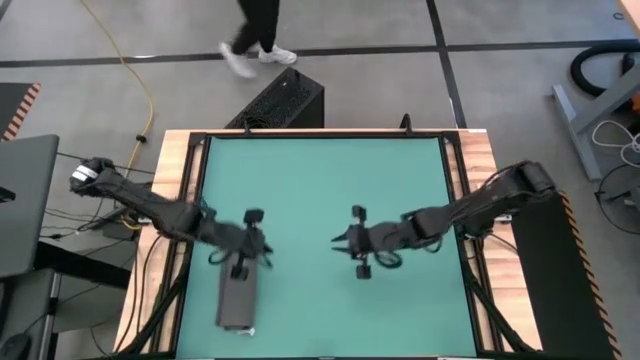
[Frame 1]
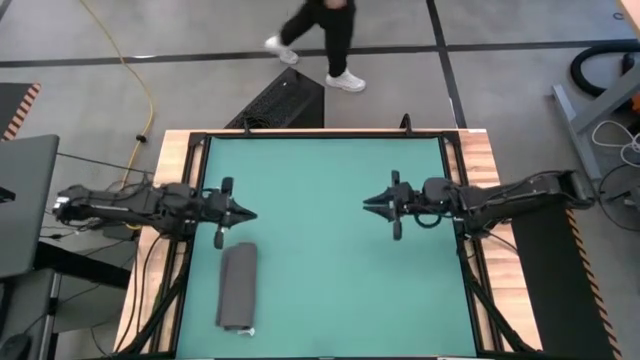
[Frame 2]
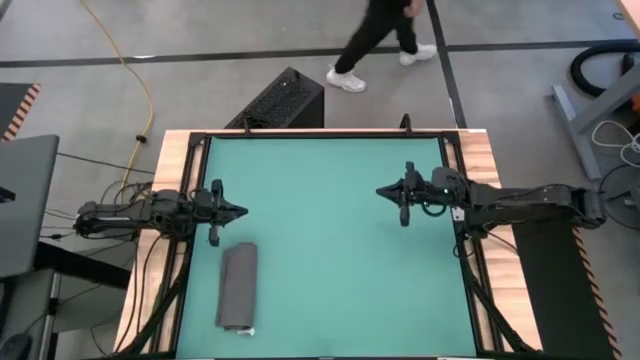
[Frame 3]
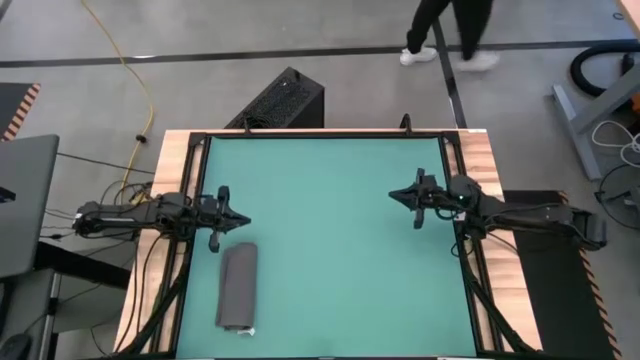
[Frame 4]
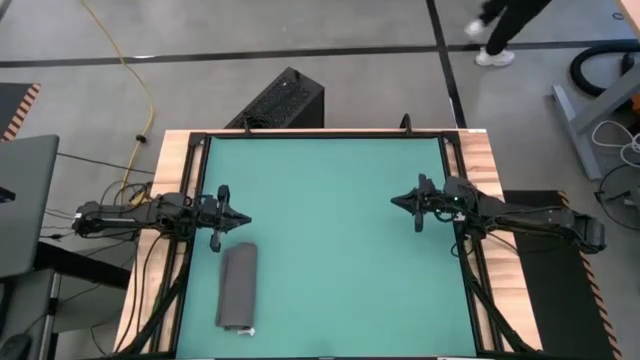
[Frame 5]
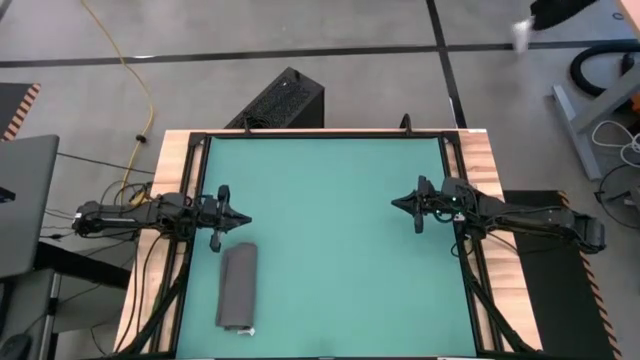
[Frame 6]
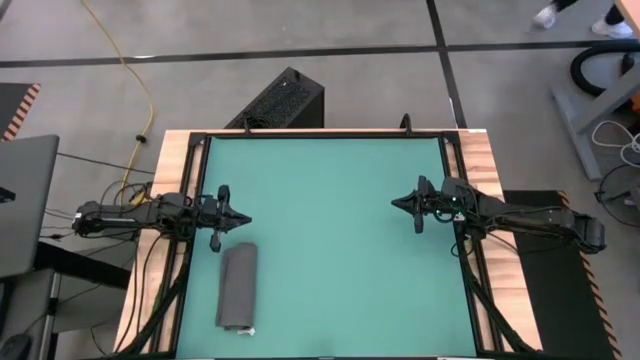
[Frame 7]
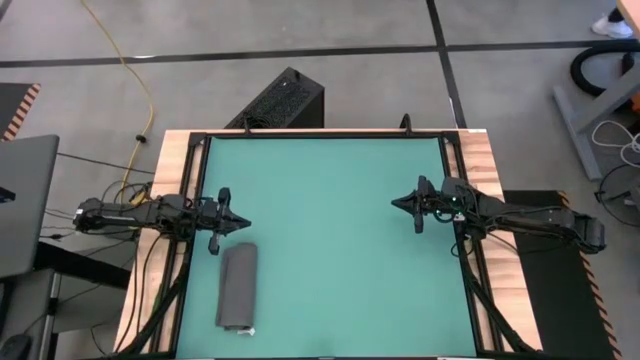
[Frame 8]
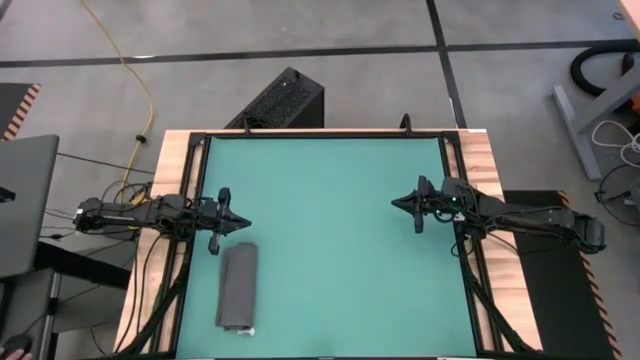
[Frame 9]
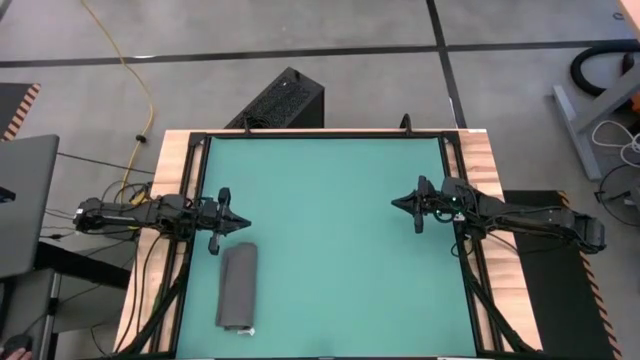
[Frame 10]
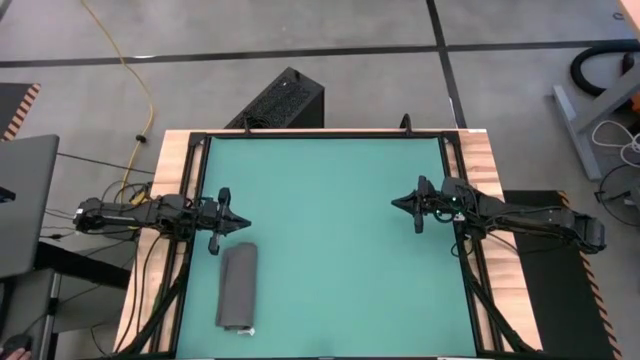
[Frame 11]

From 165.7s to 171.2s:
Task: Roll towel
Return to Home Position

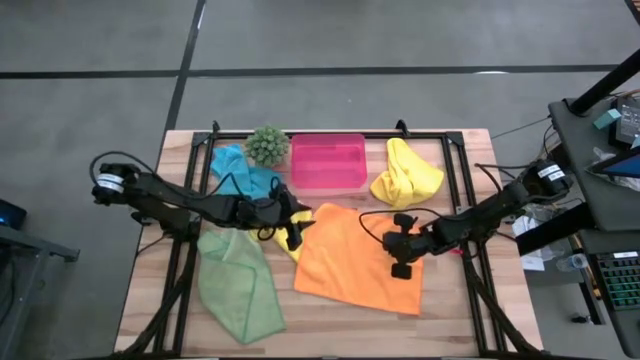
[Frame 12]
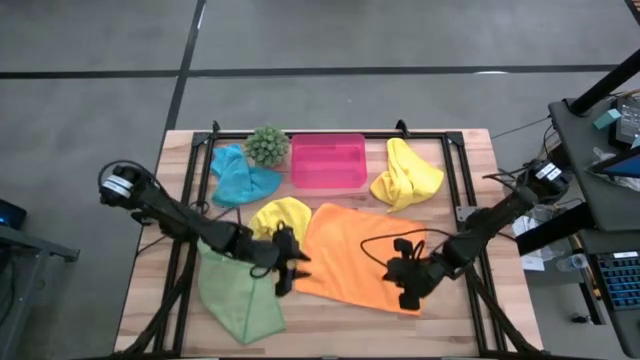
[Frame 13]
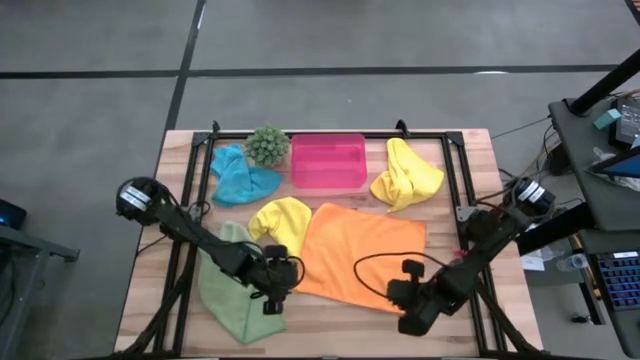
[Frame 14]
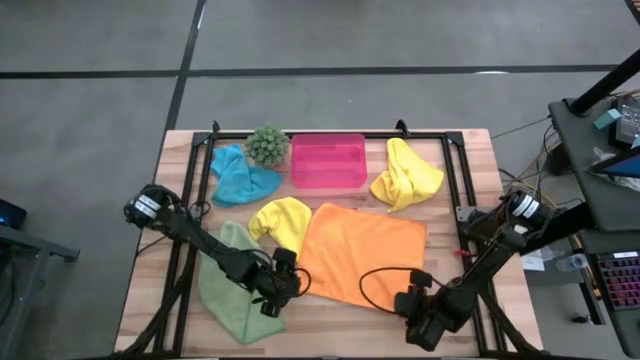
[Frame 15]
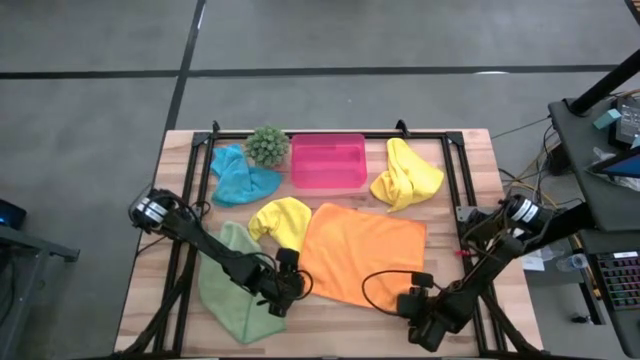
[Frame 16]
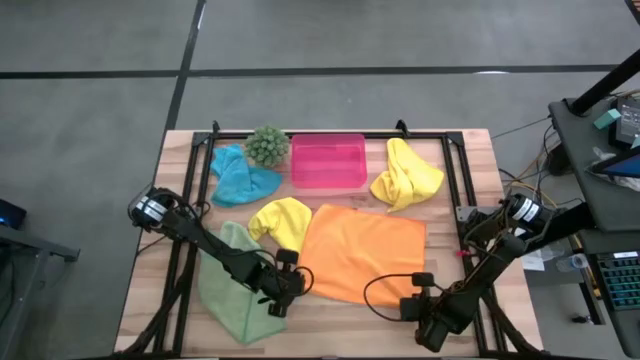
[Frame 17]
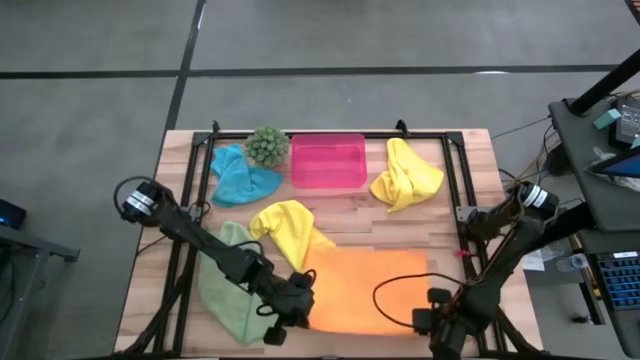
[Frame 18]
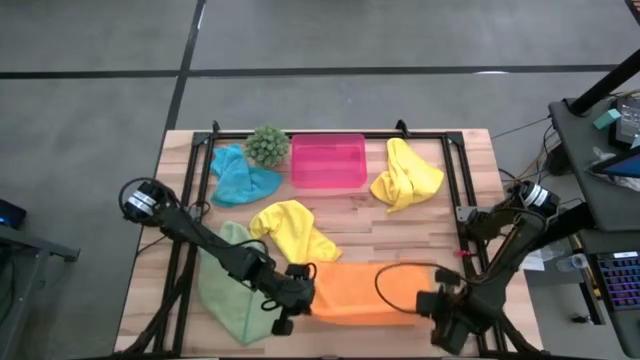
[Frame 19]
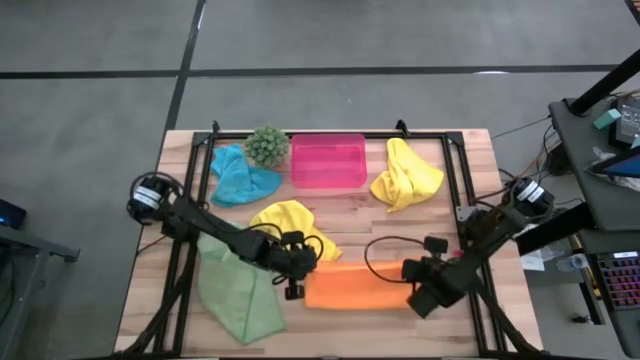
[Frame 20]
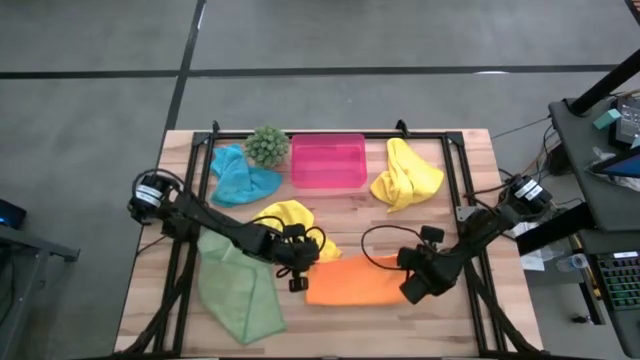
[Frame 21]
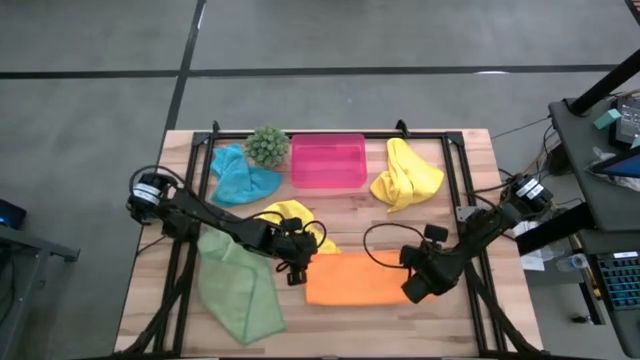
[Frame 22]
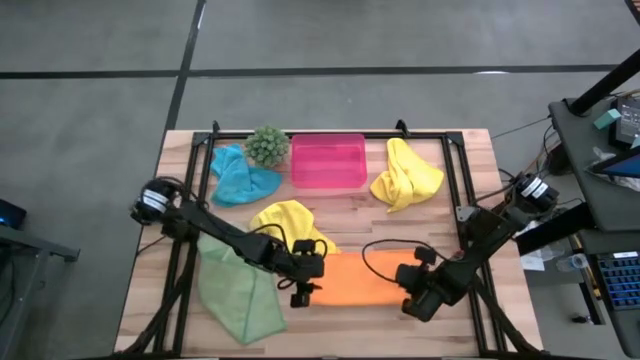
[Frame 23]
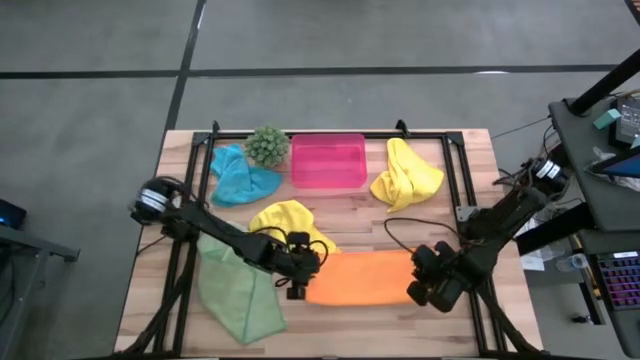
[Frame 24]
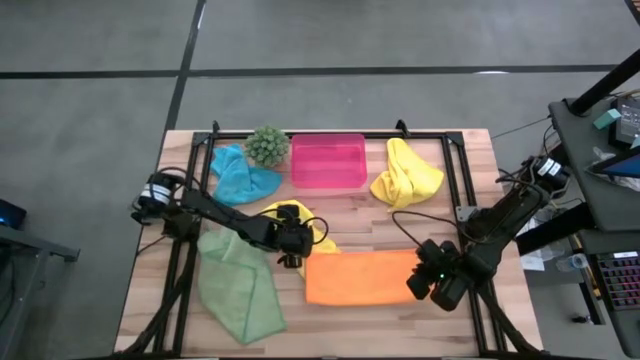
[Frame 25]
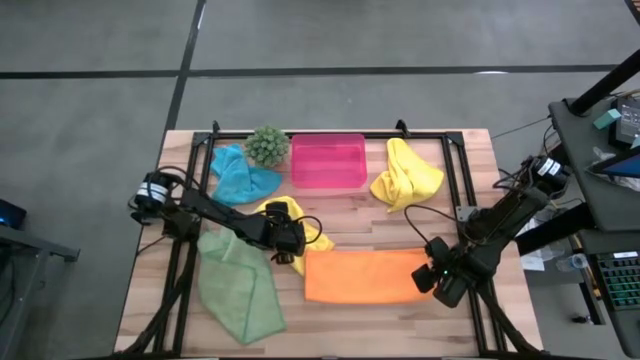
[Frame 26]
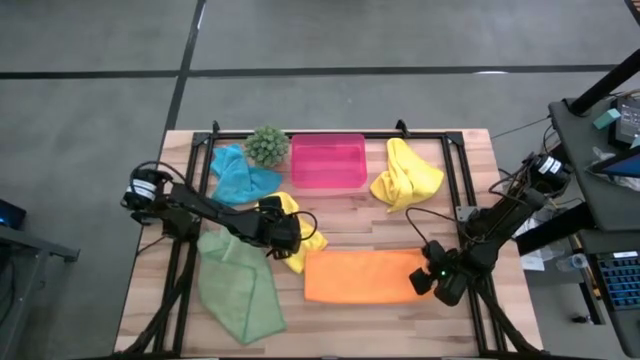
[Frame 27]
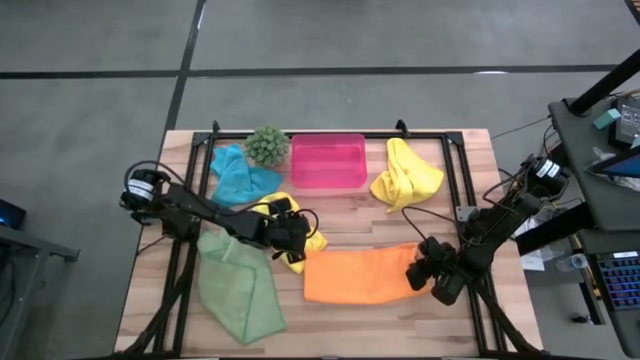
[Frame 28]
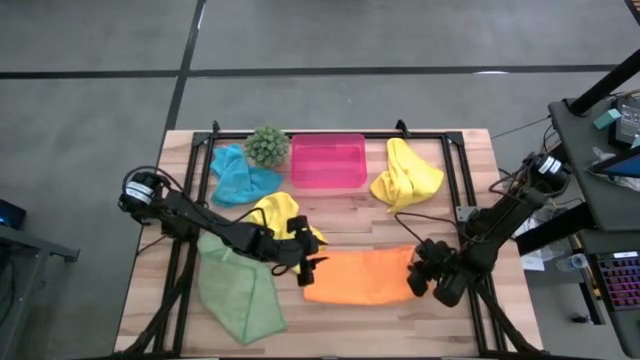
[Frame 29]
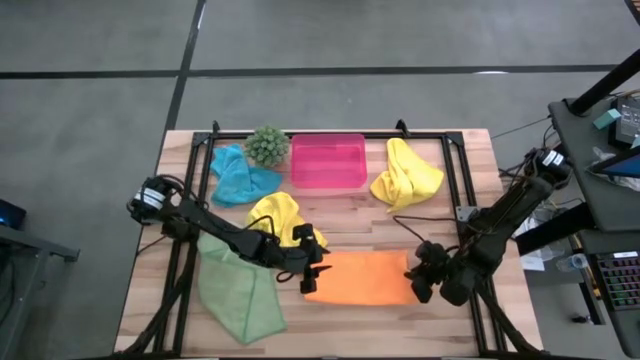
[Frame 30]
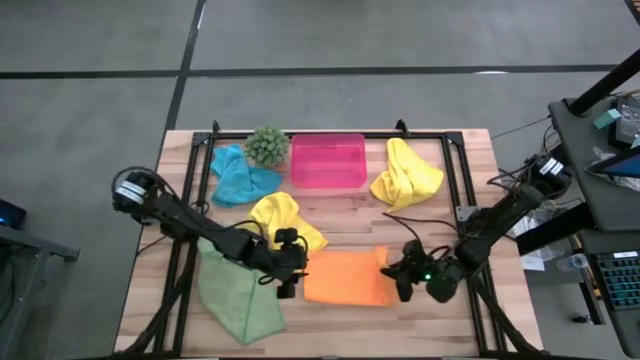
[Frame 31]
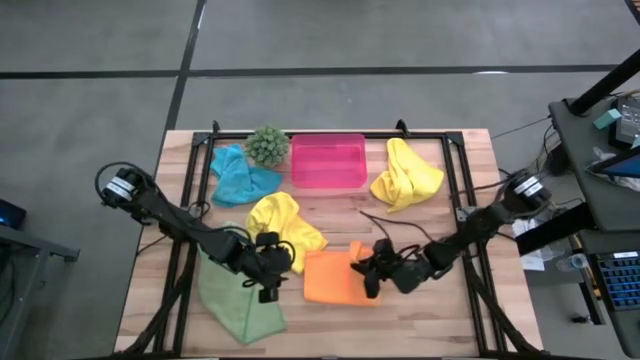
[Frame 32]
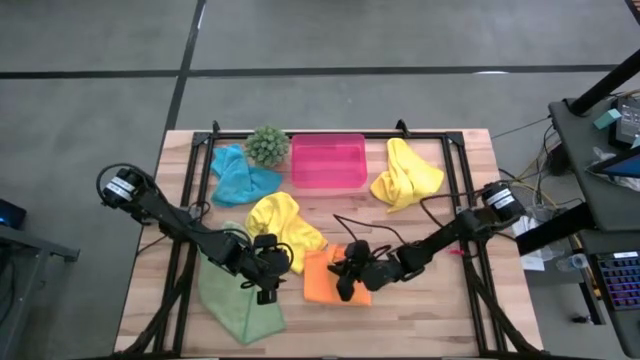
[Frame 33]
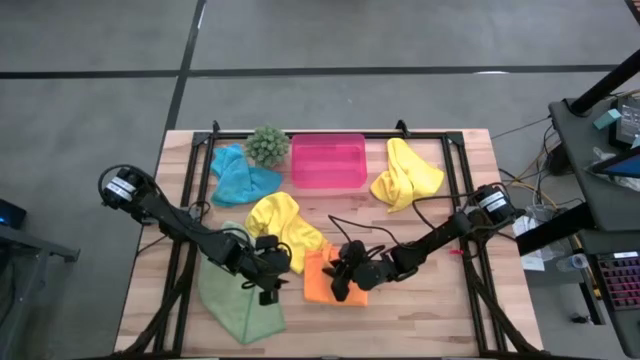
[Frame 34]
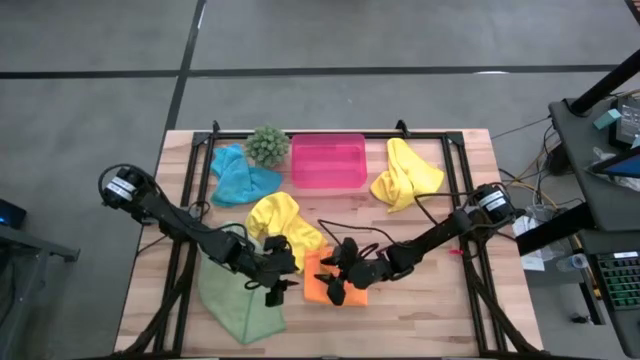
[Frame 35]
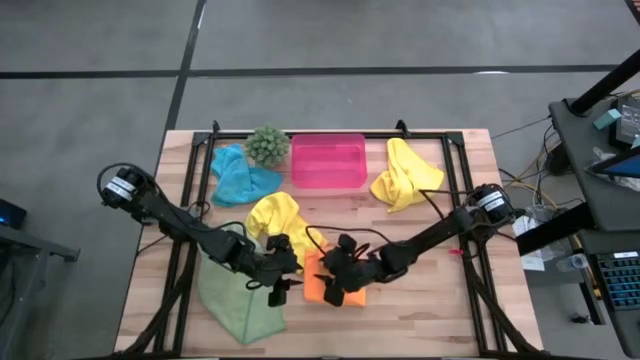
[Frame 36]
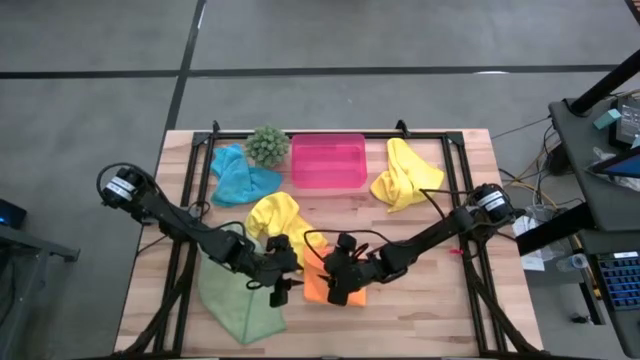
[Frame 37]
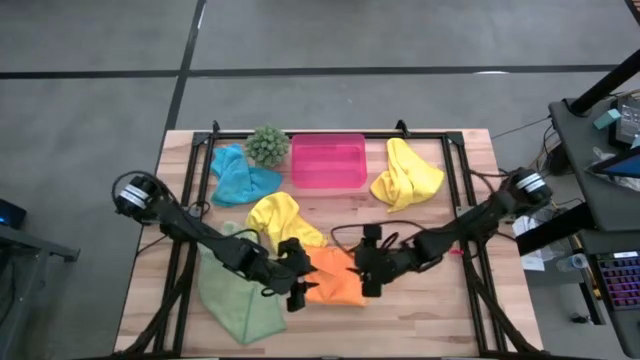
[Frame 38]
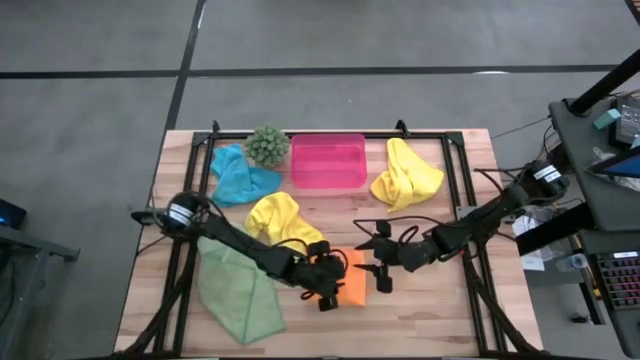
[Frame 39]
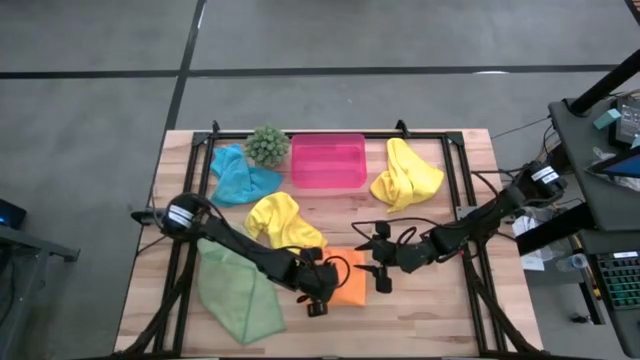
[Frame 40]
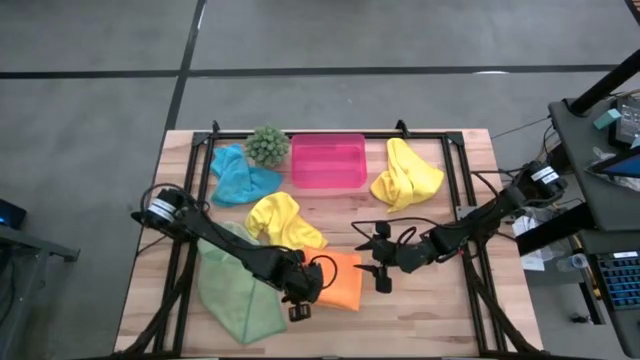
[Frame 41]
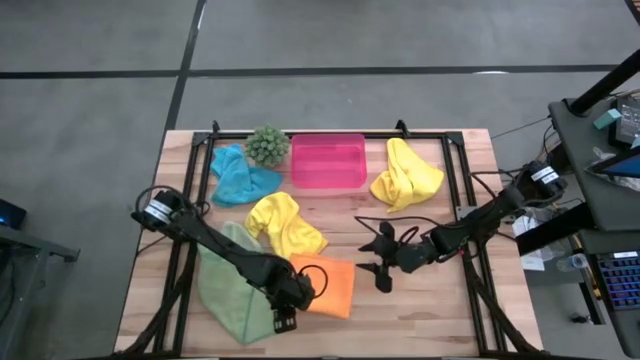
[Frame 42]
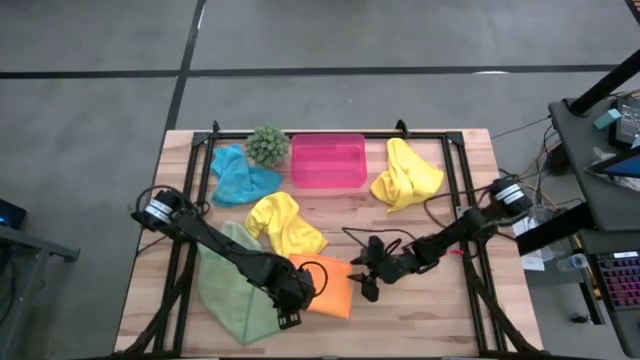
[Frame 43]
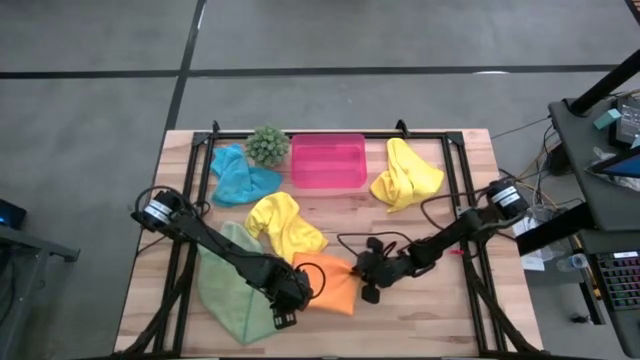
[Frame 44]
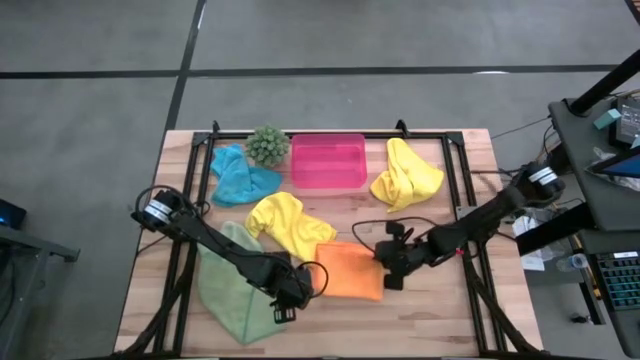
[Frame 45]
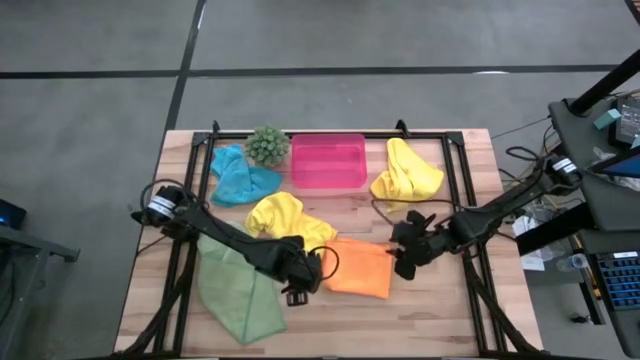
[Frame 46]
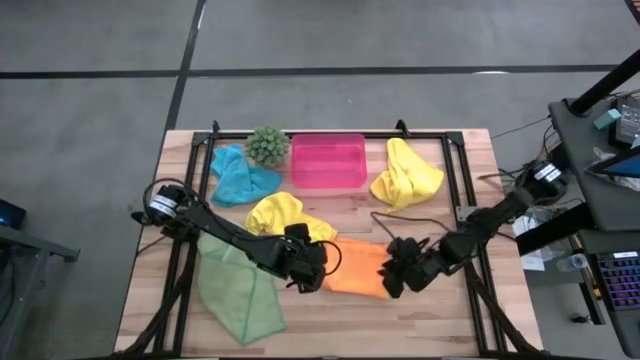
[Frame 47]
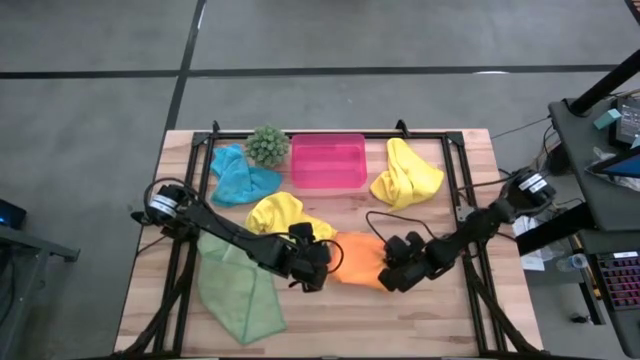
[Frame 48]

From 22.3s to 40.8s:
Task: Fold microfiber towels
Fold the orange microfiber towel
